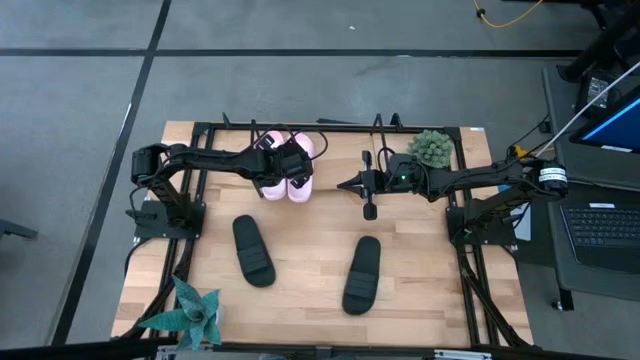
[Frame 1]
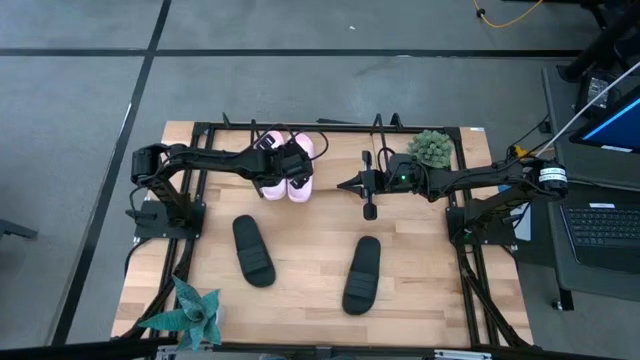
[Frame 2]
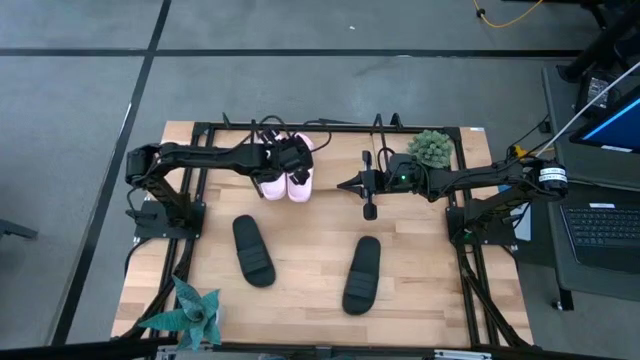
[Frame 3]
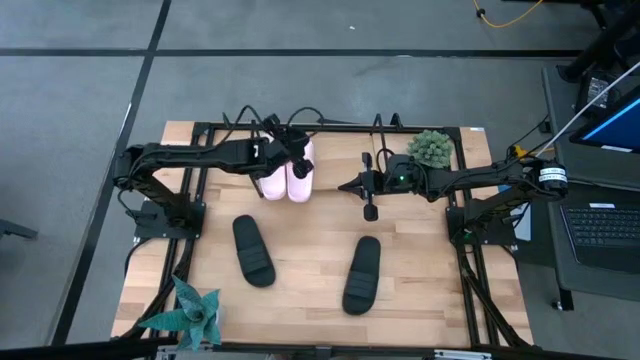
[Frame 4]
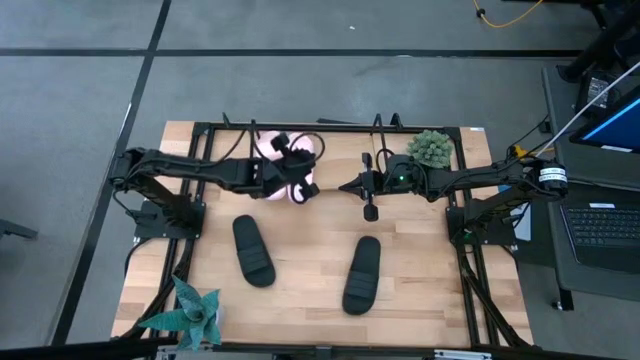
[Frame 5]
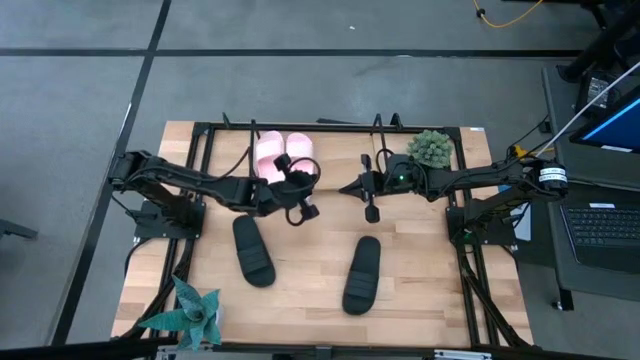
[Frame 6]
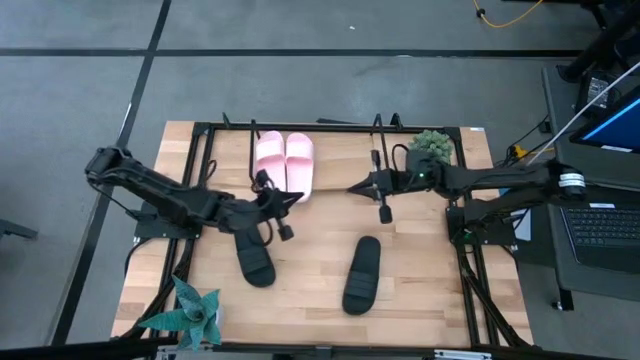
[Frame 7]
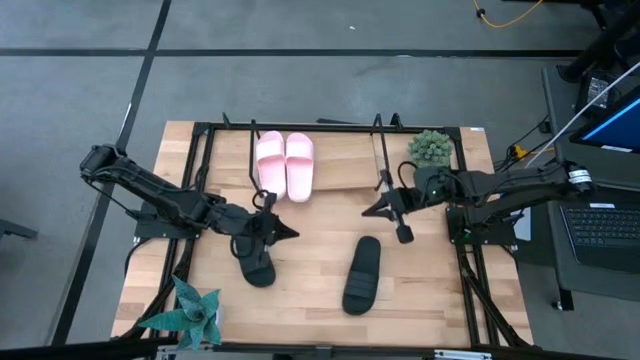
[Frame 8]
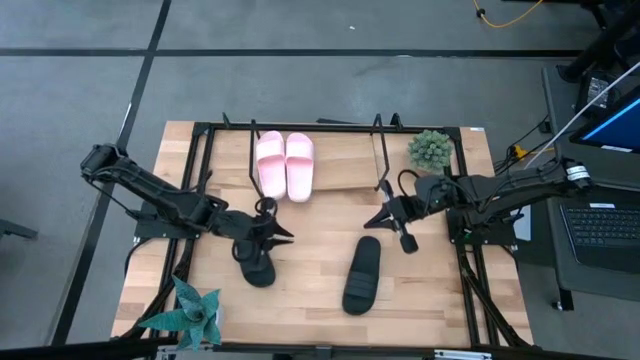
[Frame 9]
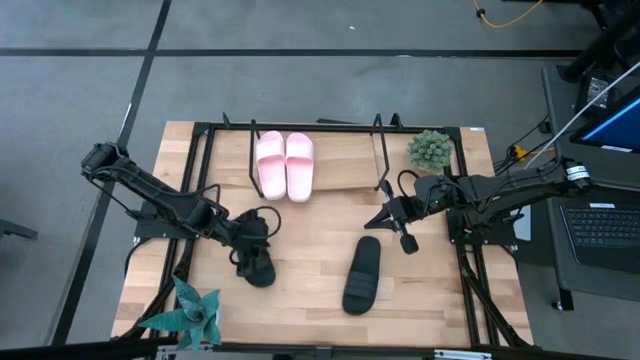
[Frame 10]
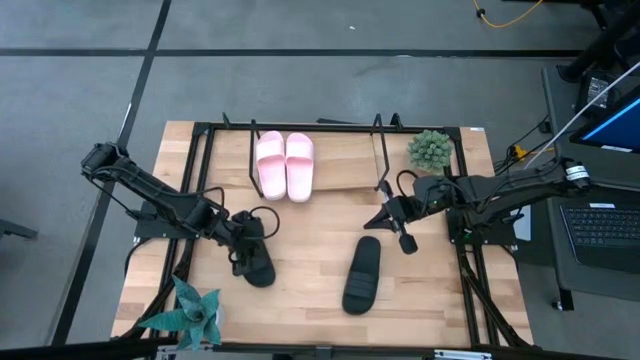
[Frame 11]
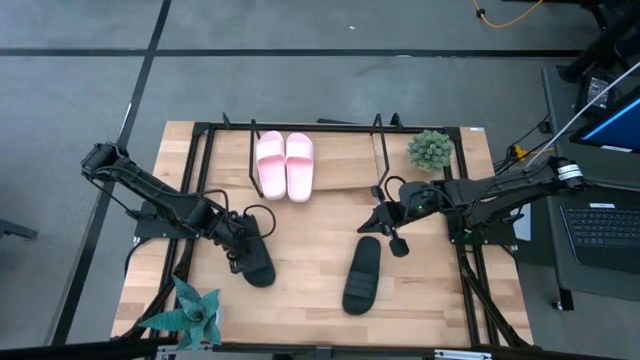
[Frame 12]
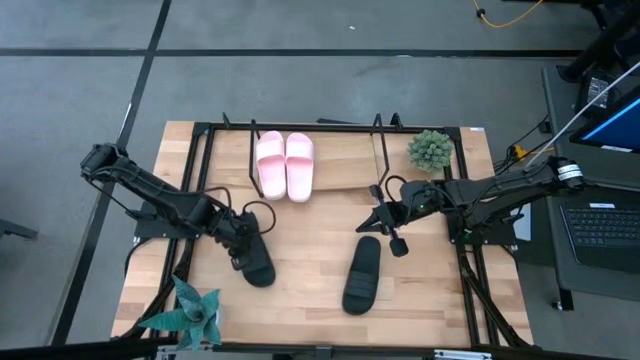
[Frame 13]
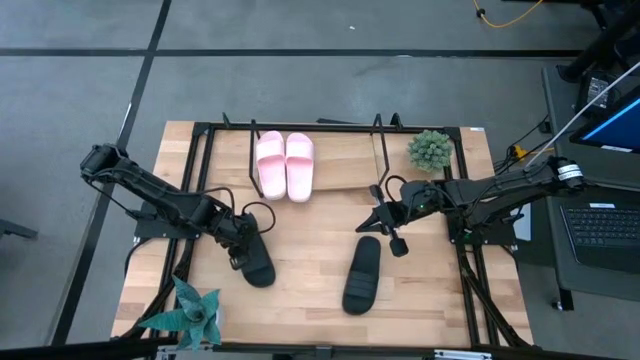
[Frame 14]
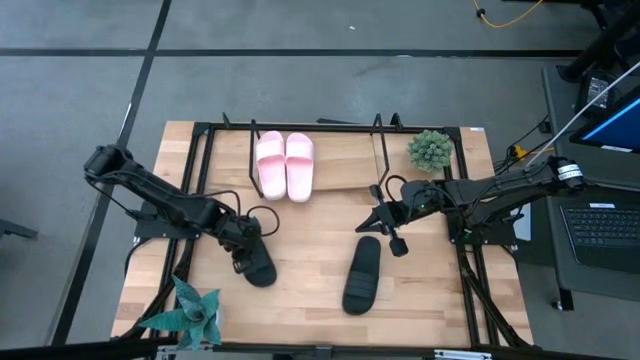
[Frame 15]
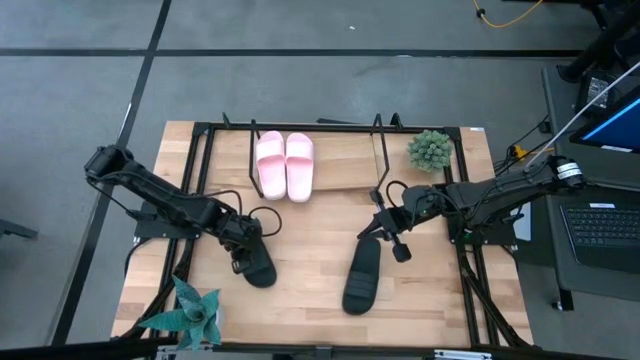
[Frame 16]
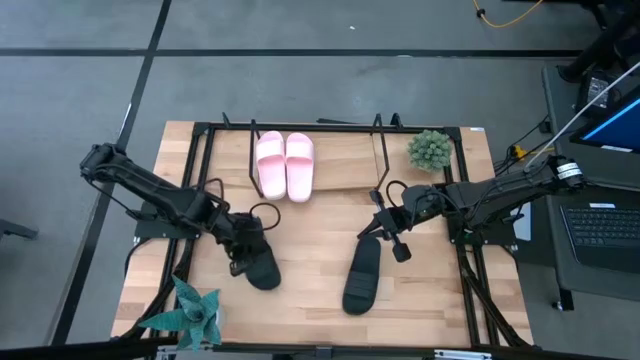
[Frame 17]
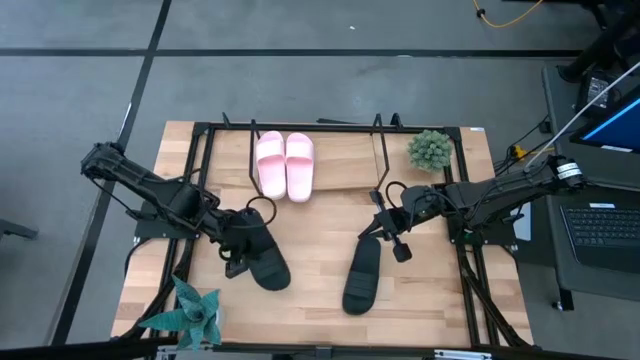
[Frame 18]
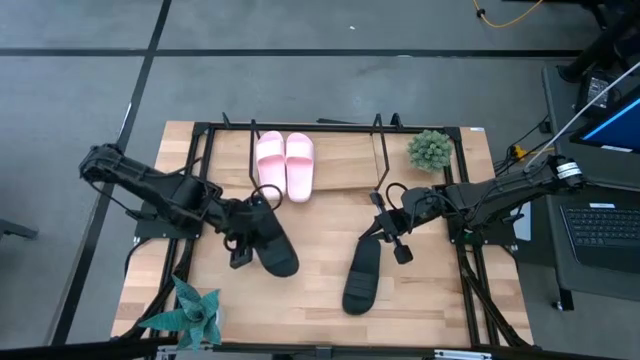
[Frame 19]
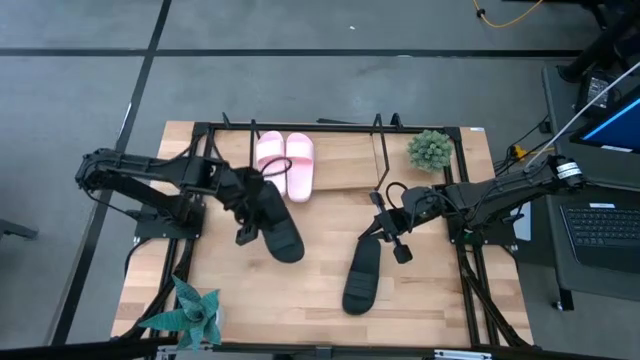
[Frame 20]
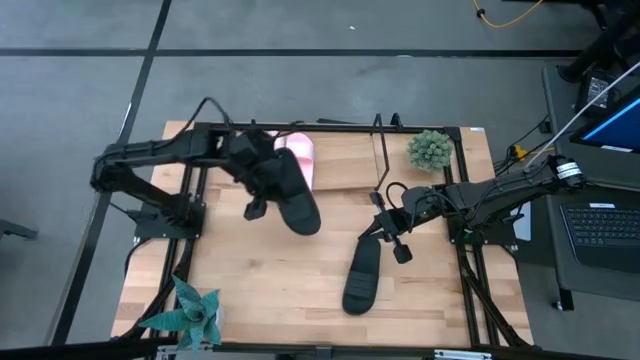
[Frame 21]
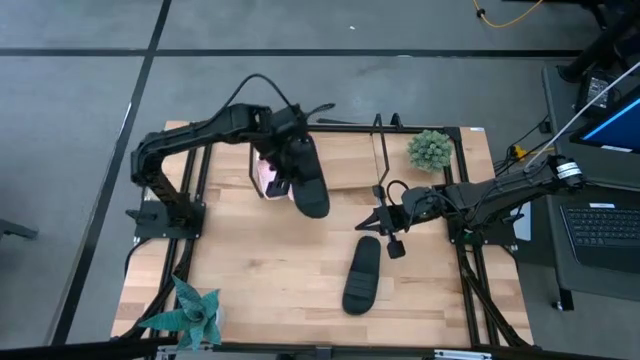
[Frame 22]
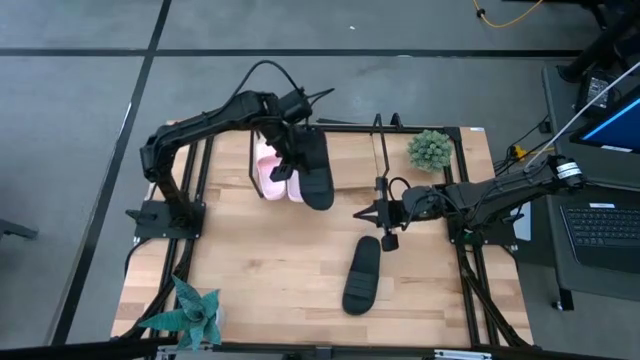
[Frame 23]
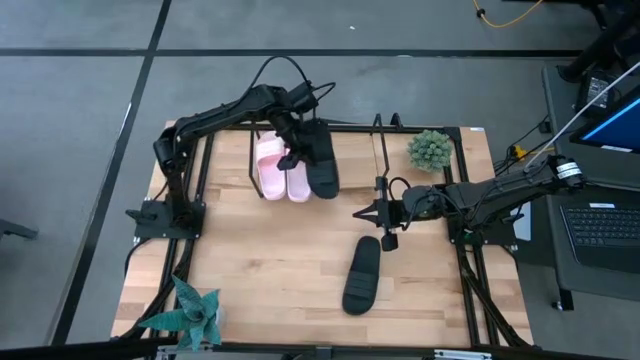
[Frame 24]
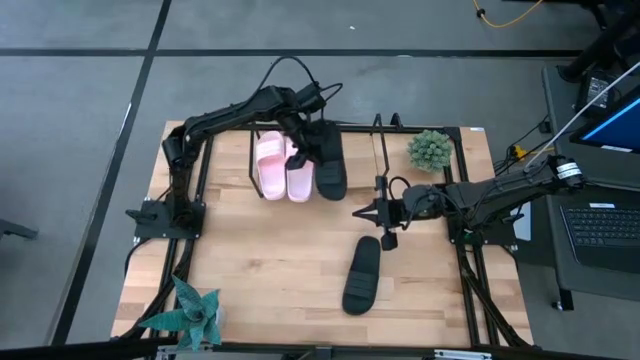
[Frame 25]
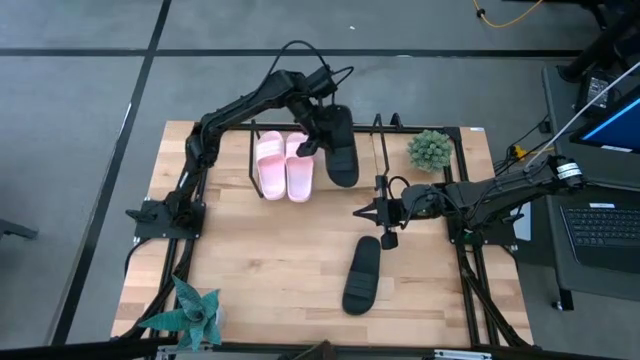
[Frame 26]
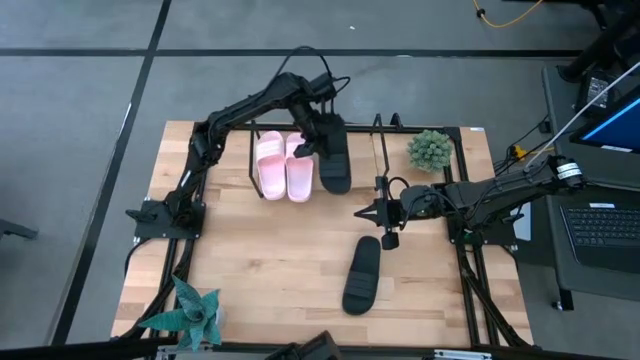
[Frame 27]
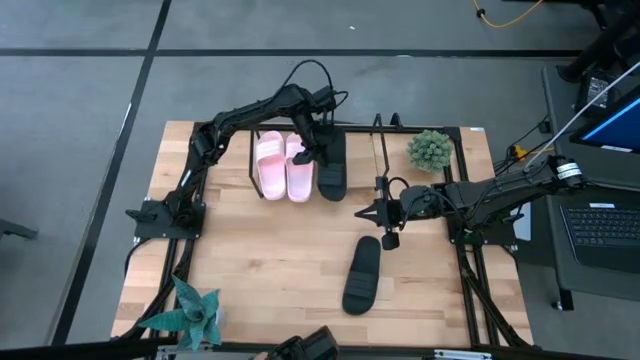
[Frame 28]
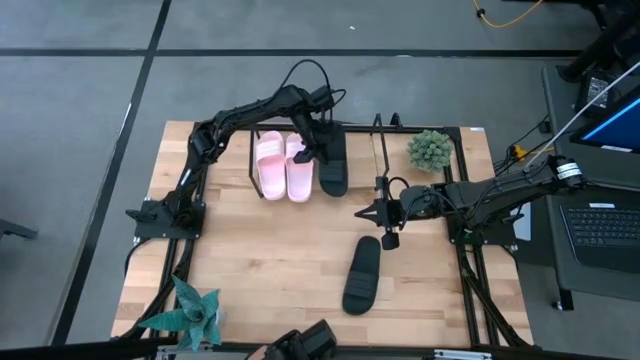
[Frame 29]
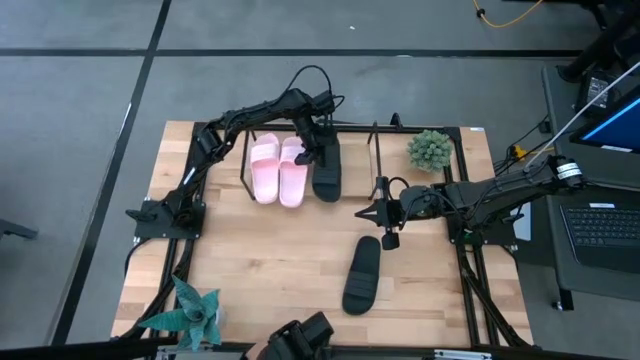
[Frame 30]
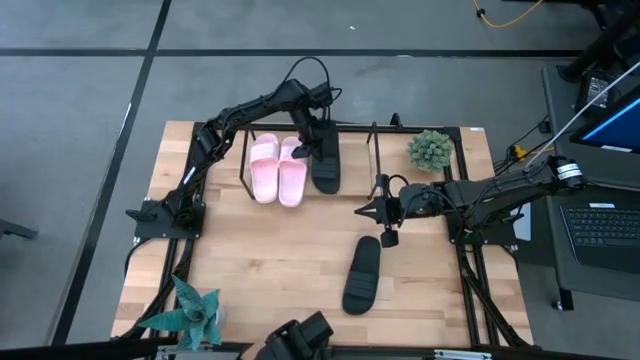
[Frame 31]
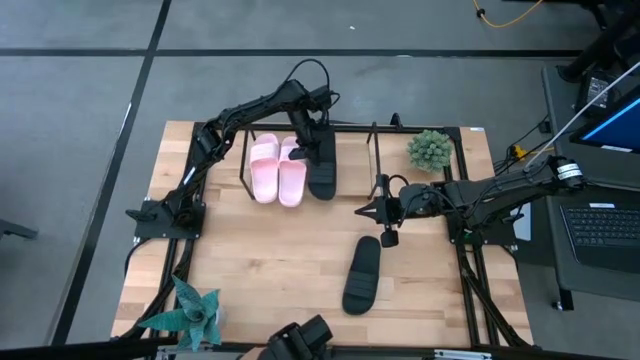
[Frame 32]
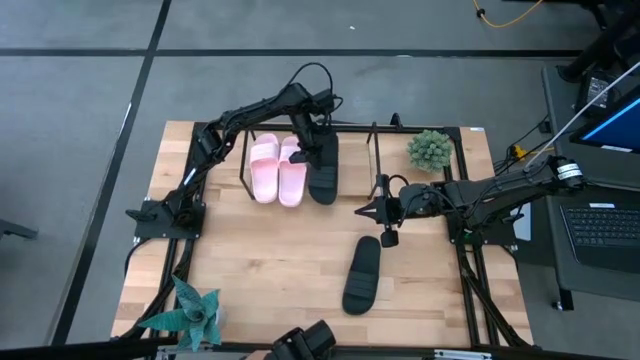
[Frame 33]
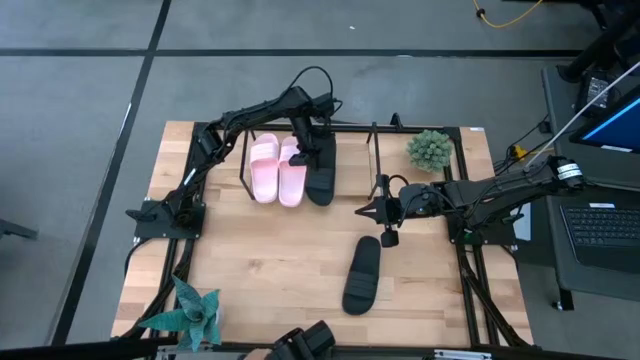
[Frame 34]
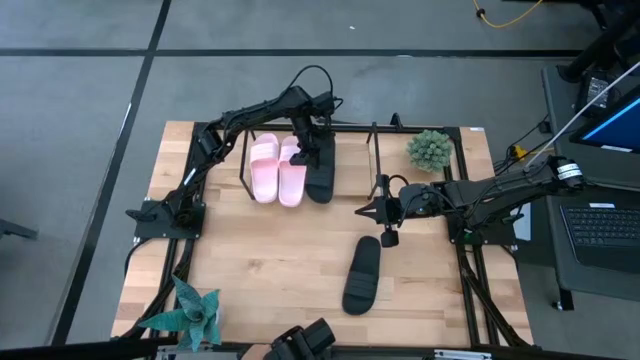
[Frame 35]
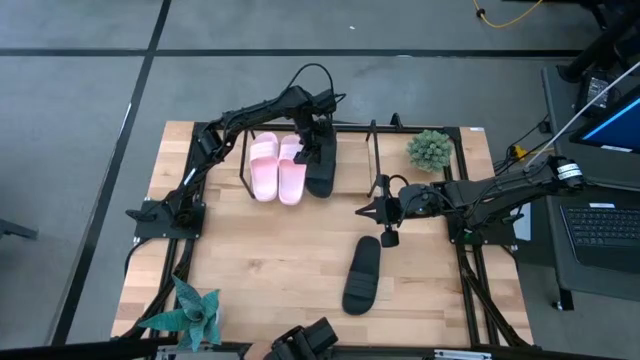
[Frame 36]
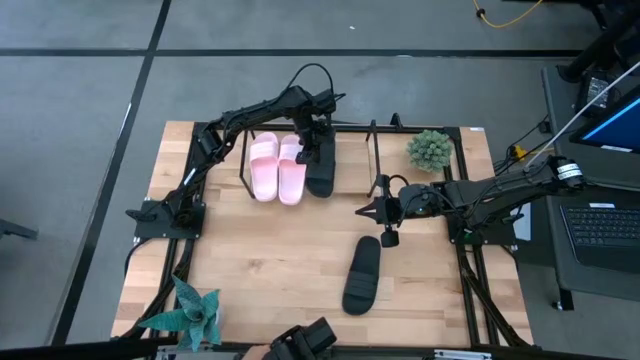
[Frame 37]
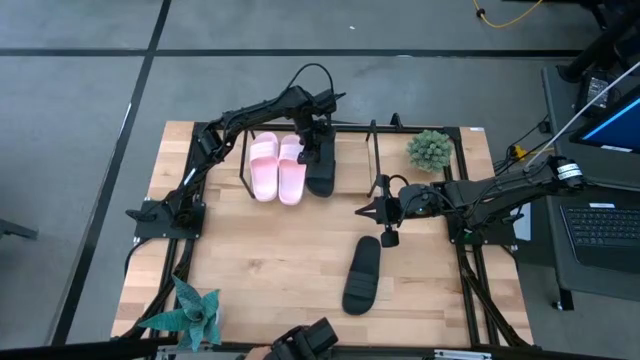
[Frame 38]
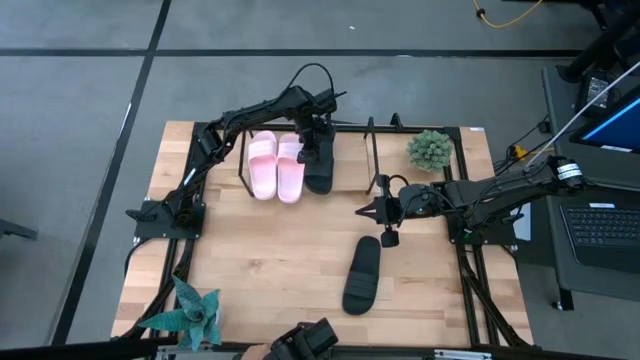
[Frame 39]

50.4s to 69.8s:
Task: Pick and place slides into the shelf
Put the left black slide on the shelf

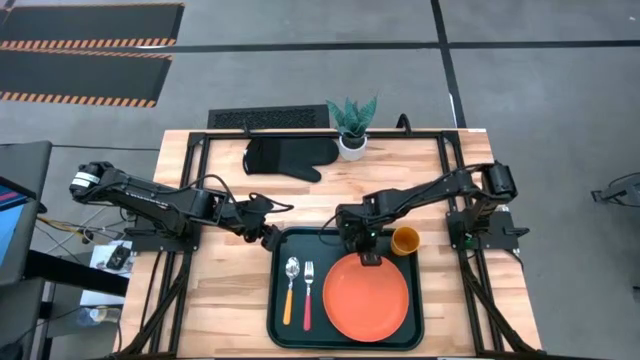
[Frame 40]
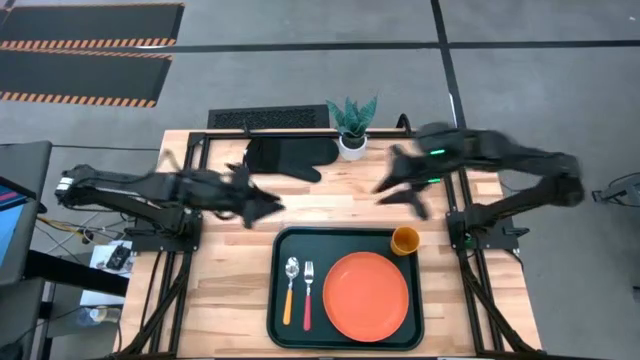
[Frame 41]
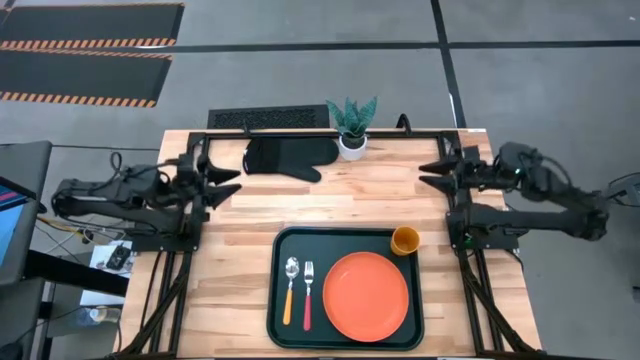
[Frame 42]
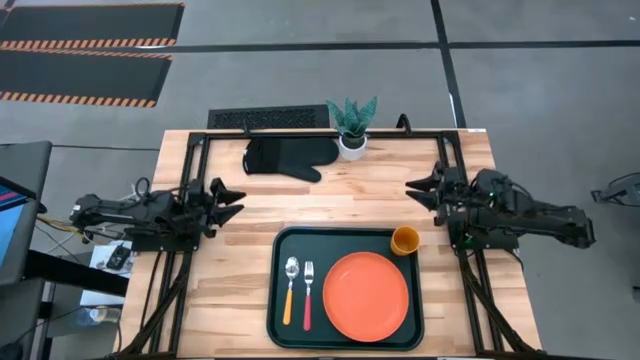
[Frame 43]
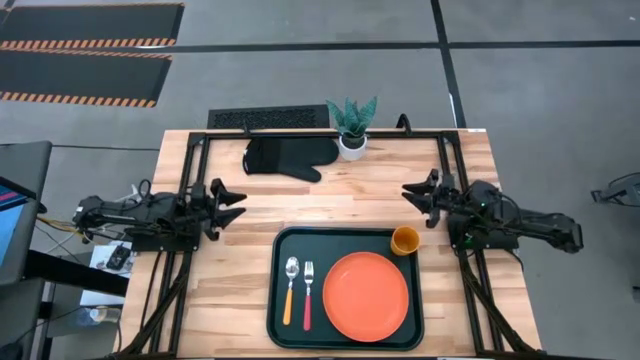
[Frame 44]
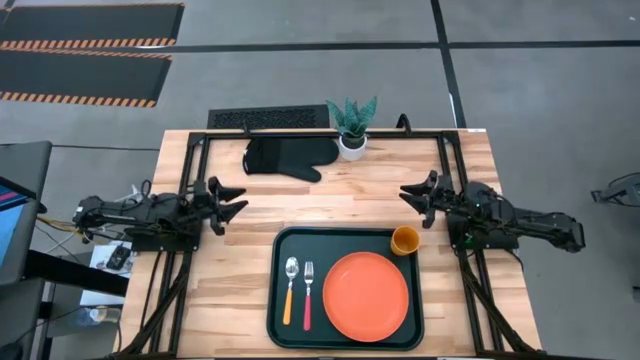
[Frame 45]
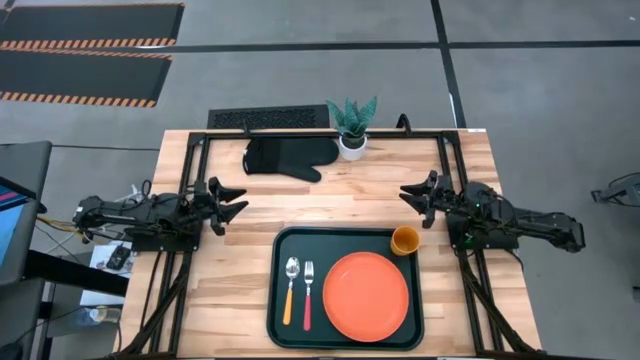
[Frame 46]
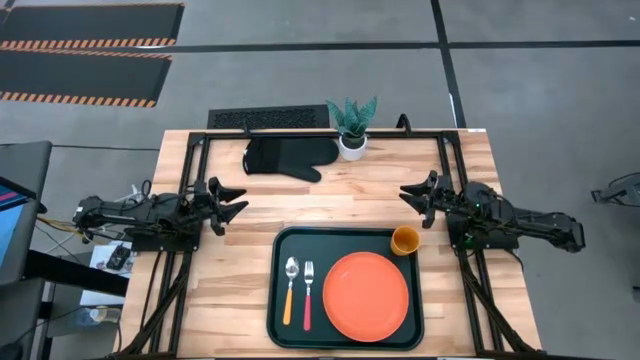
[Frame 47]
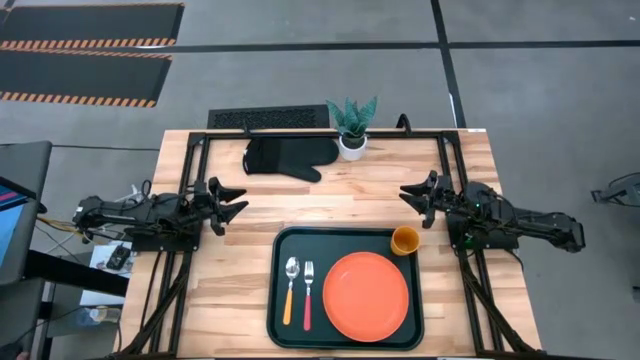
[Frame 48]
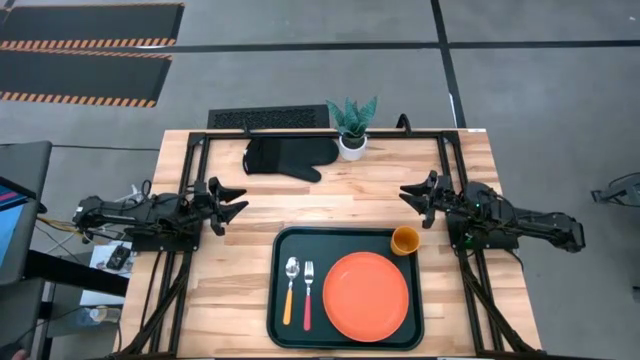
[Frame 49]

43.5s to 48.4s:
Task: Pick and place plate/cup/fork/spoon on tray
Return to Home Position
